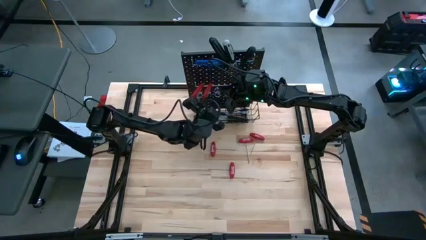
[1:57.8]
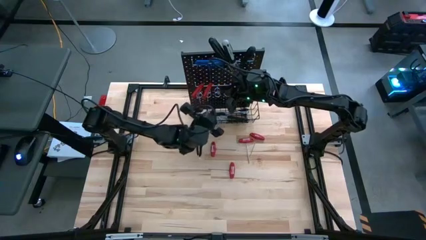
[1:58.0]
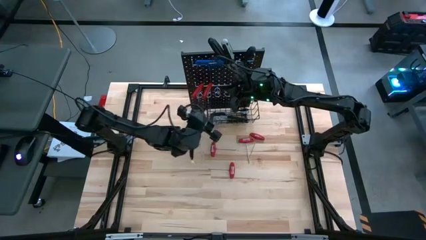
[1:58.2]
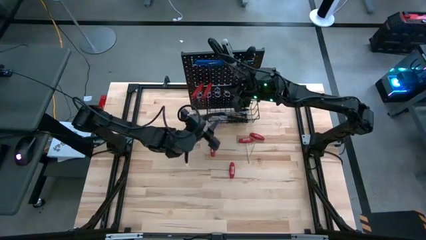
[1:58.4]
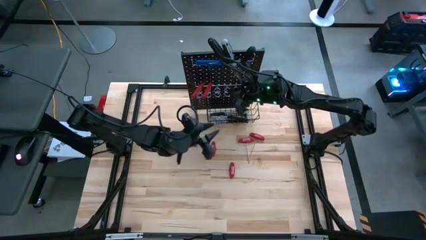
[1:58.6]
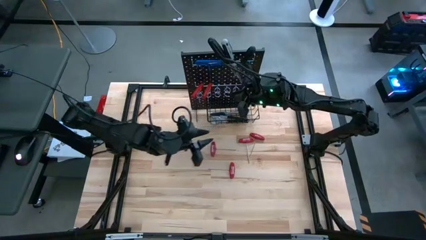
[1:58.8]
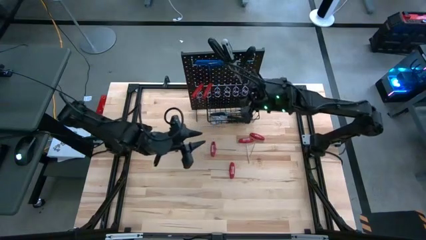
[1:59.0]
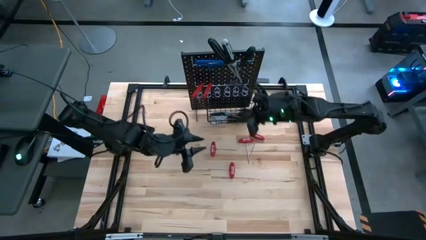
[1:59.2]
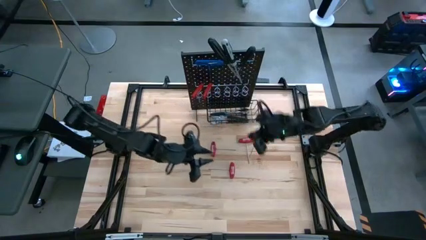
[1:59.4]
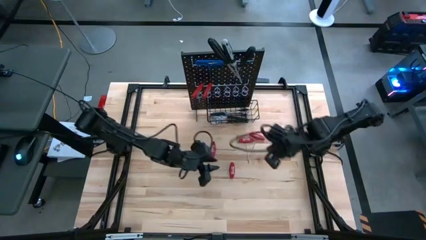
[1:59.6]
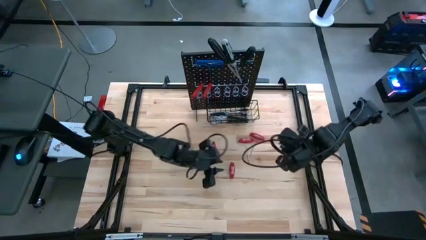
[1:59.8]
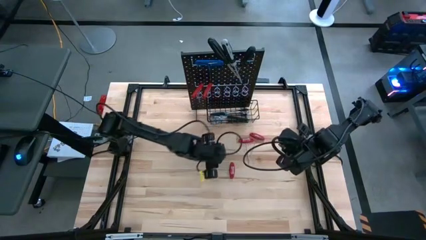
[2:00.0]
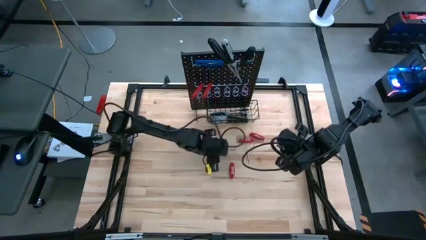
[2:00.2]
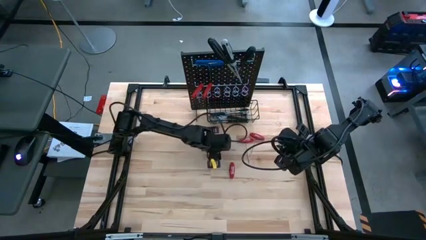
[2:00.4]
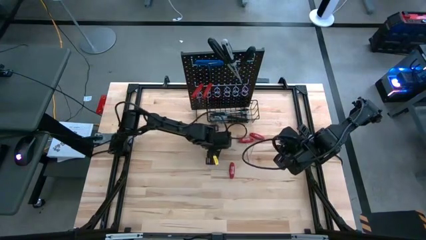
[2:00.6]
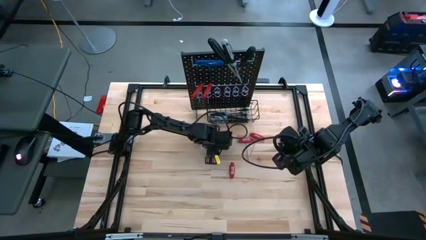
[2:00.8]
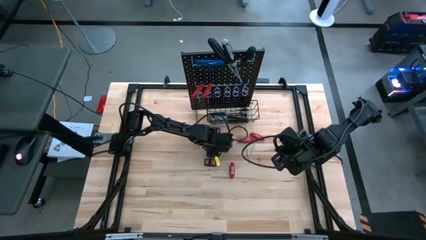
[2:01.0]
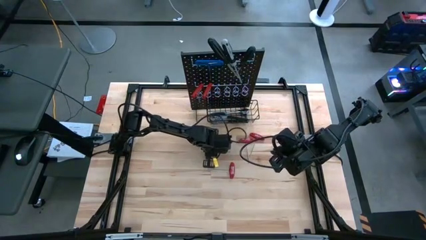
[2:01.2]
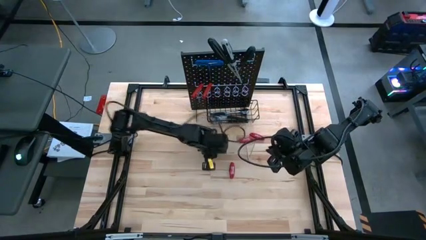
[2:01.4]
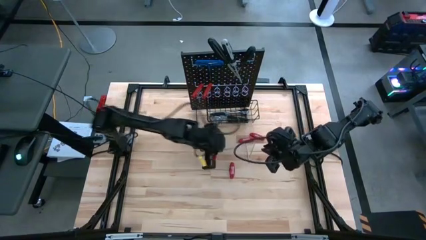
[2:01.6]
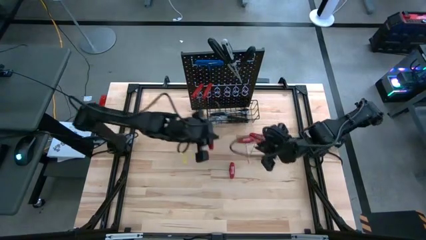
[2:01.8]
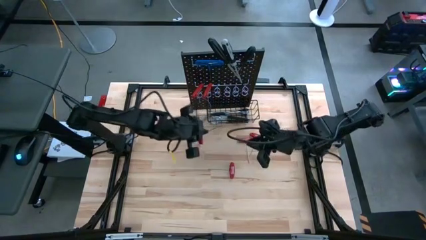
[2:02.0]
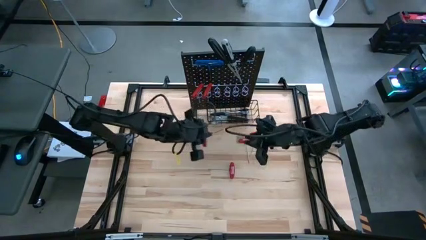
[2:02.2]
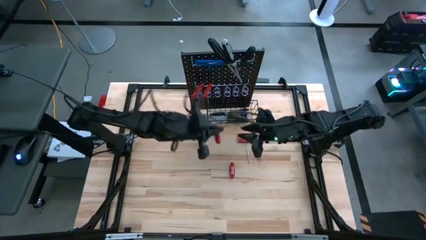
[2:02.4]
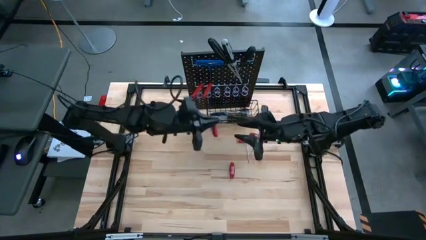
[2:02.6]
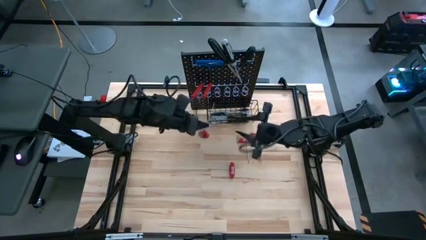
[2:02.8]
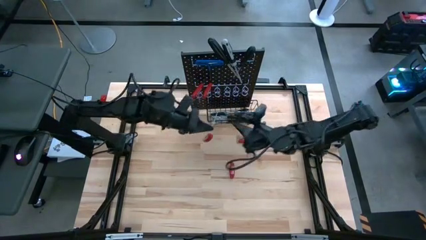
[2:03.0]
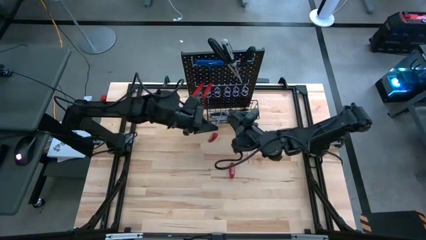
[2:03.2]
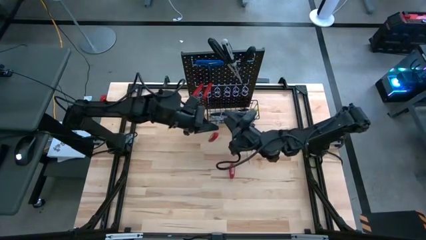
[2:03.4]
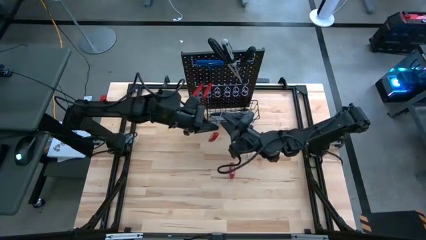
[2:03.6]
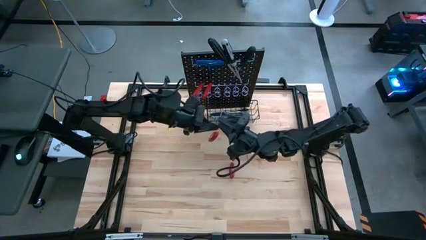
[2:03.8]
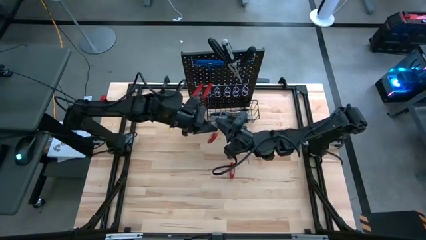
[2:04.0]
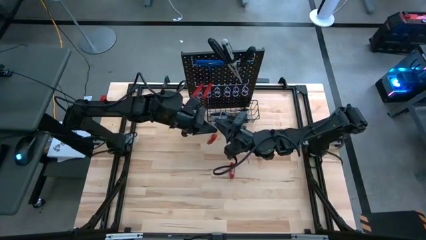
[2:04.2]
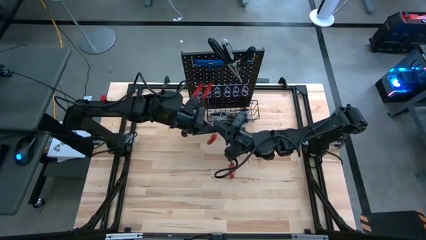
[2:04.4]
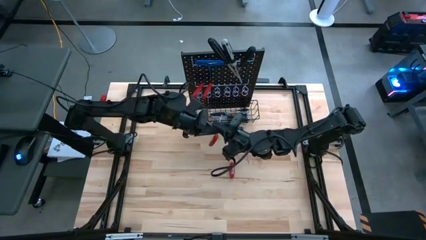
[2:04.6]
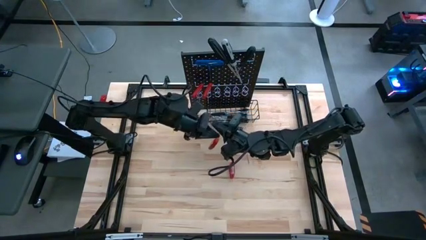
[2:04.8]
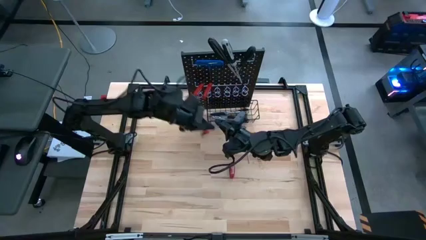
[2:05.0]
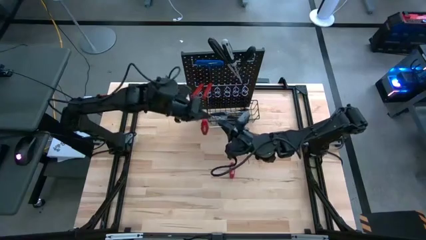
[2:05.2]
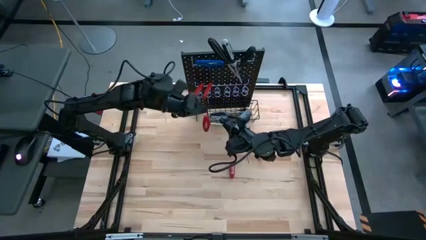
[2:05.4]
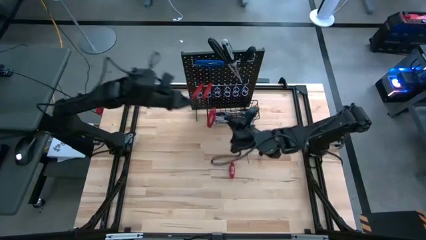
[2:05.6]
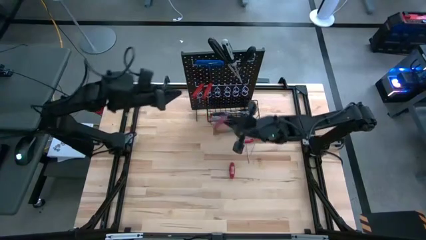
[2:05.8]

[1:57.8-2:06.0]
Task: Hang tools onto peg board
Hang the red allen wrench on the pegboard

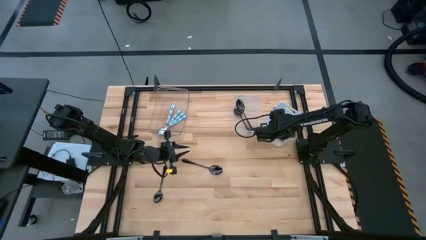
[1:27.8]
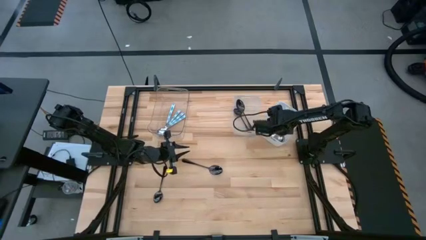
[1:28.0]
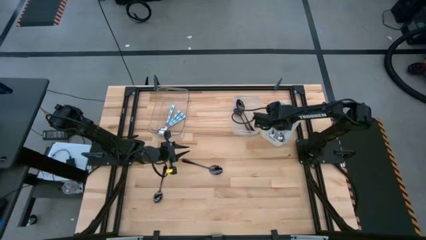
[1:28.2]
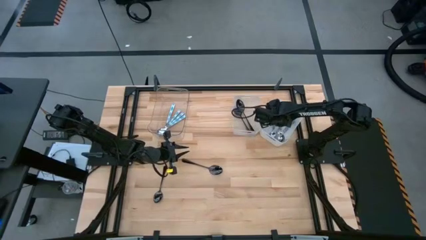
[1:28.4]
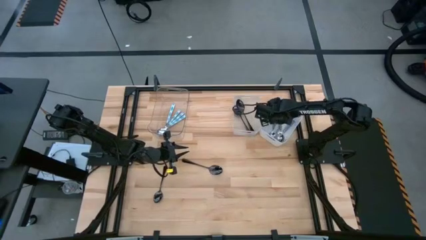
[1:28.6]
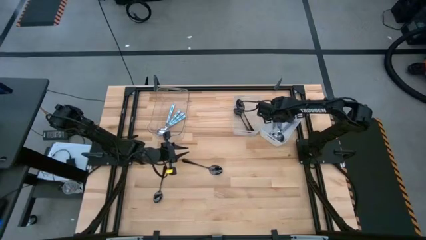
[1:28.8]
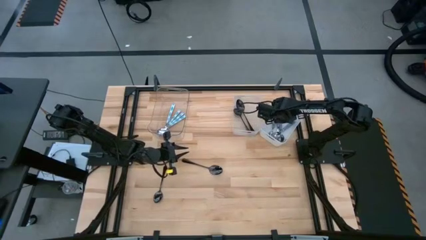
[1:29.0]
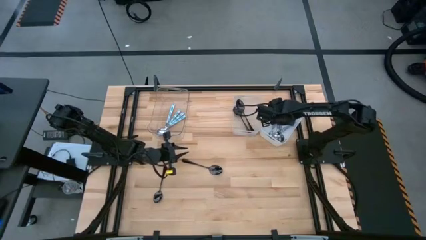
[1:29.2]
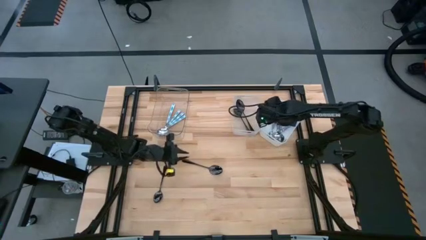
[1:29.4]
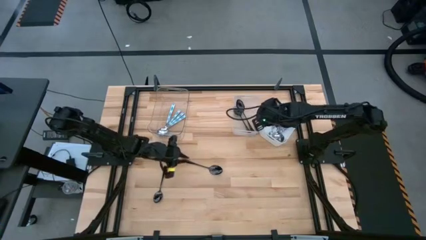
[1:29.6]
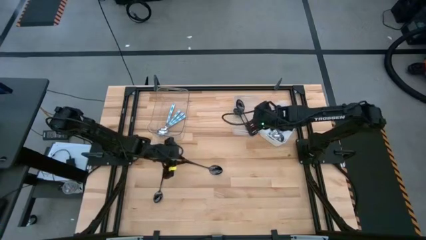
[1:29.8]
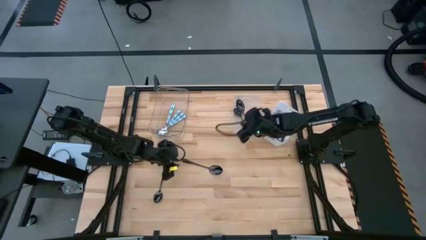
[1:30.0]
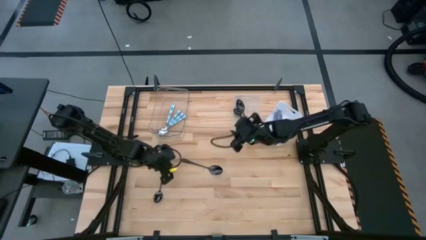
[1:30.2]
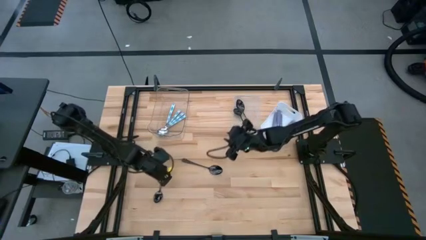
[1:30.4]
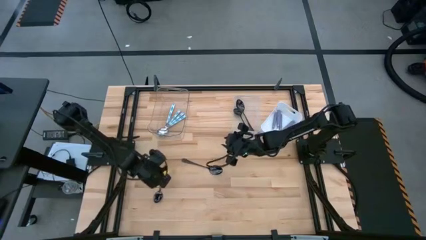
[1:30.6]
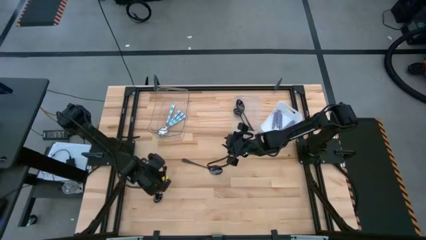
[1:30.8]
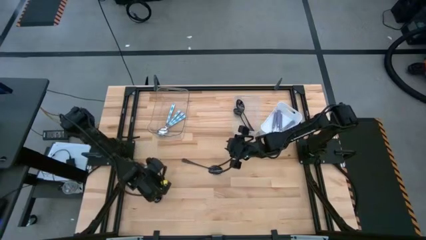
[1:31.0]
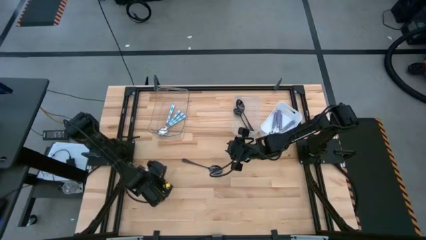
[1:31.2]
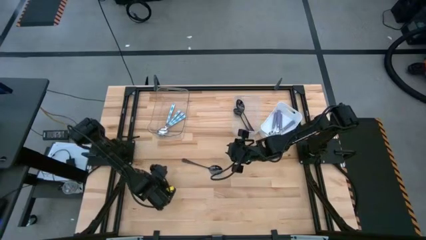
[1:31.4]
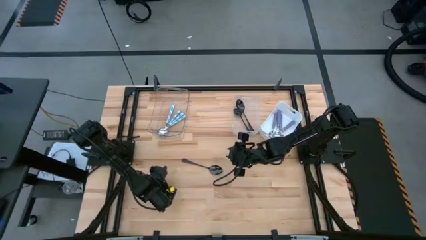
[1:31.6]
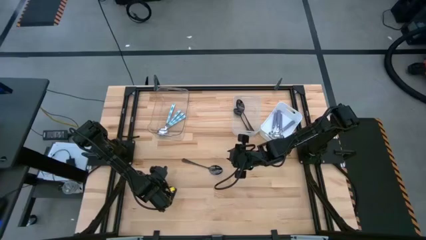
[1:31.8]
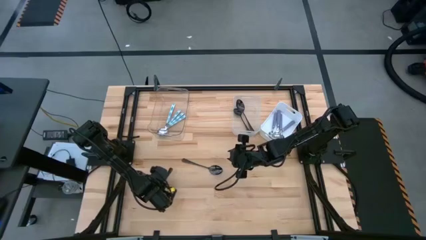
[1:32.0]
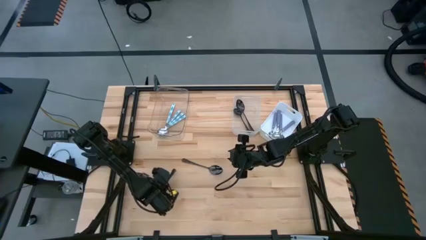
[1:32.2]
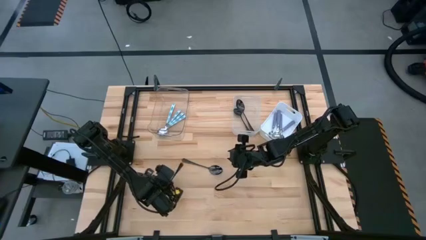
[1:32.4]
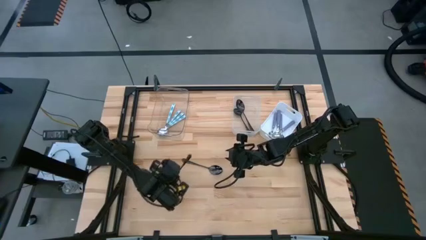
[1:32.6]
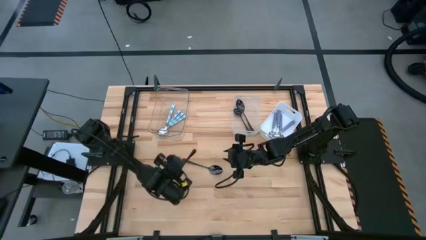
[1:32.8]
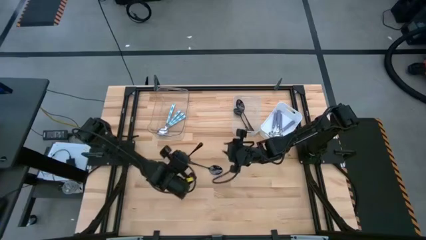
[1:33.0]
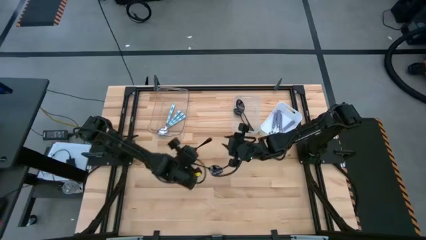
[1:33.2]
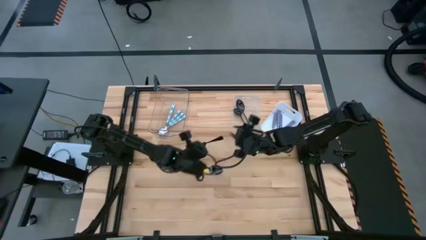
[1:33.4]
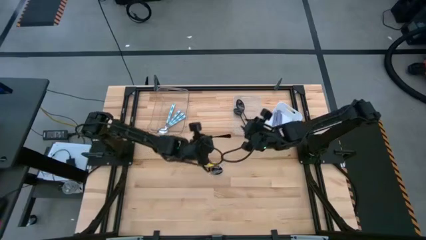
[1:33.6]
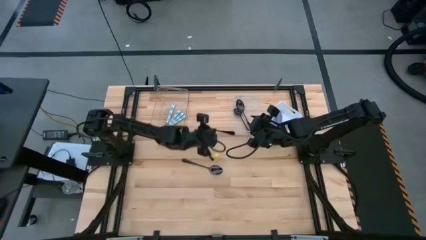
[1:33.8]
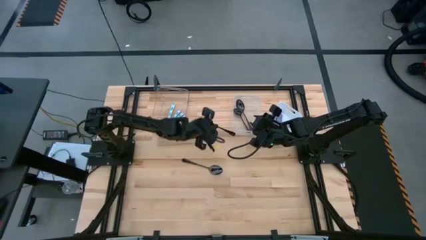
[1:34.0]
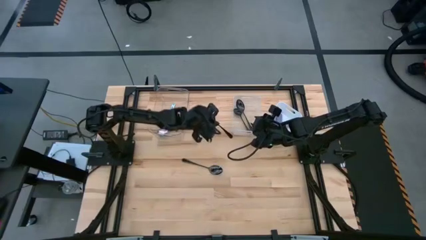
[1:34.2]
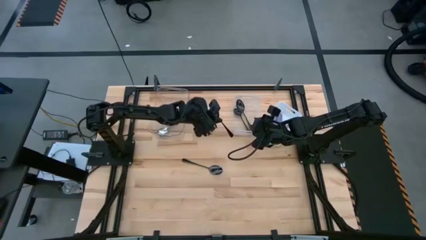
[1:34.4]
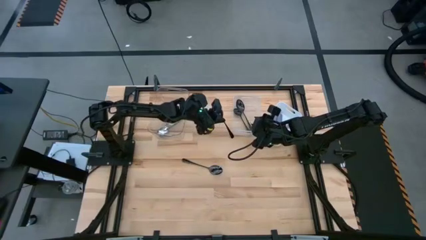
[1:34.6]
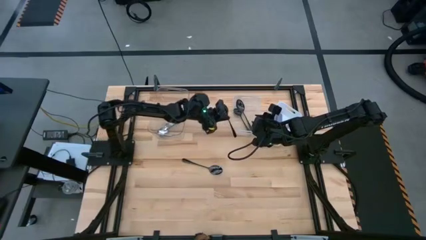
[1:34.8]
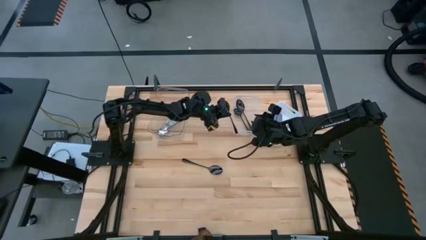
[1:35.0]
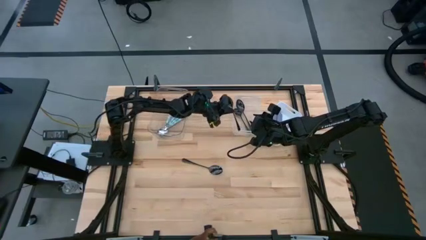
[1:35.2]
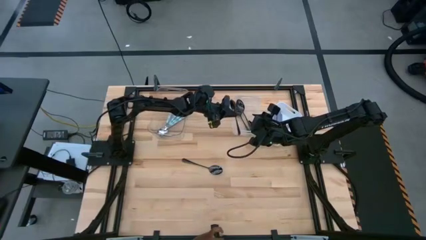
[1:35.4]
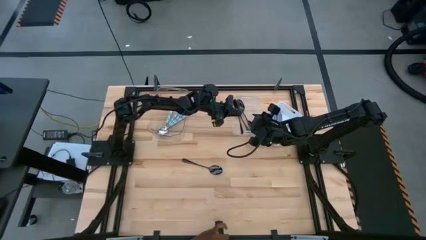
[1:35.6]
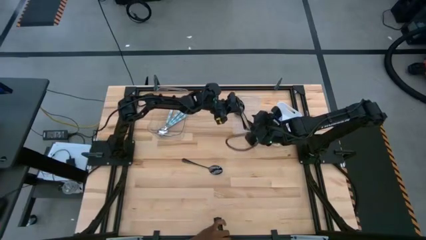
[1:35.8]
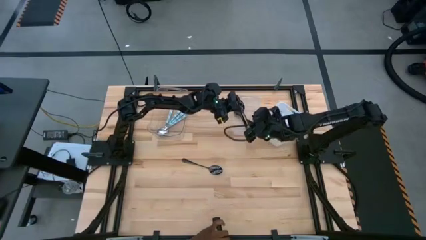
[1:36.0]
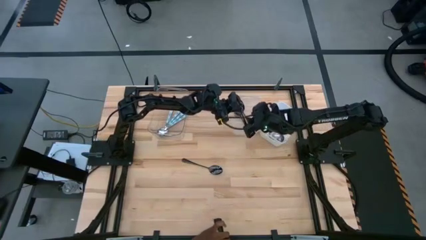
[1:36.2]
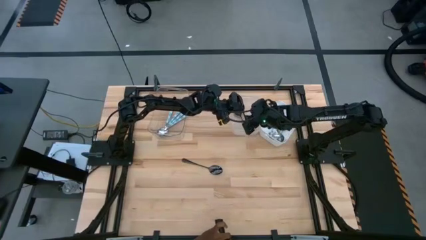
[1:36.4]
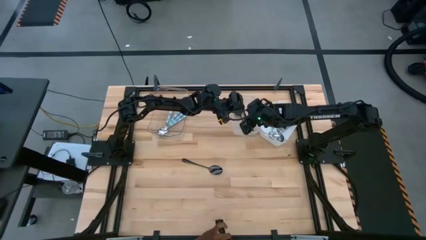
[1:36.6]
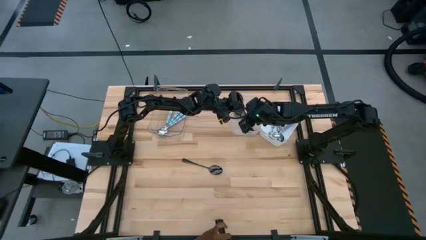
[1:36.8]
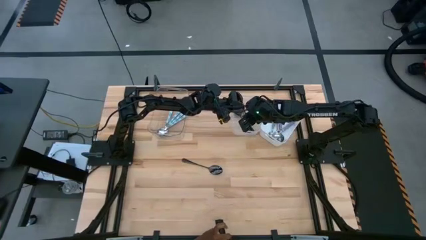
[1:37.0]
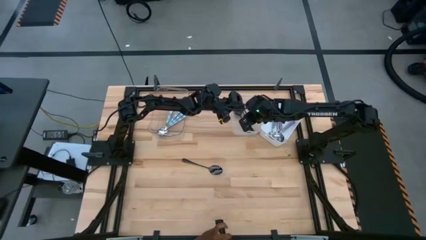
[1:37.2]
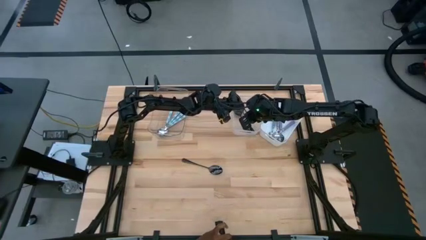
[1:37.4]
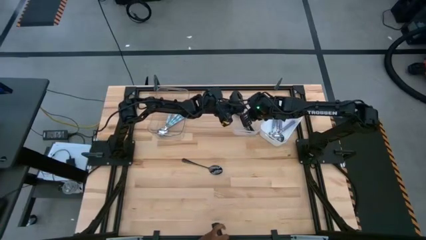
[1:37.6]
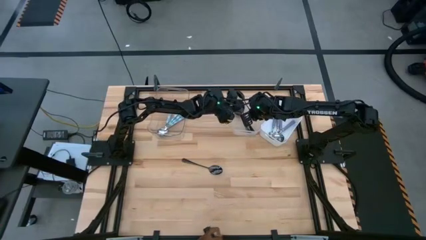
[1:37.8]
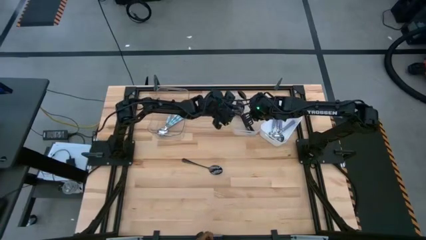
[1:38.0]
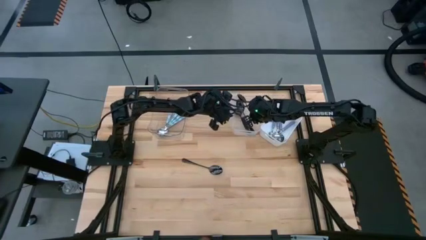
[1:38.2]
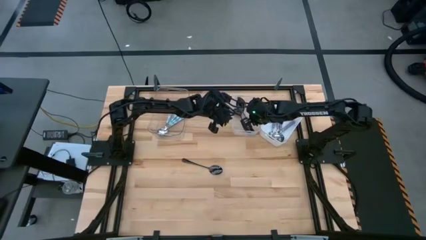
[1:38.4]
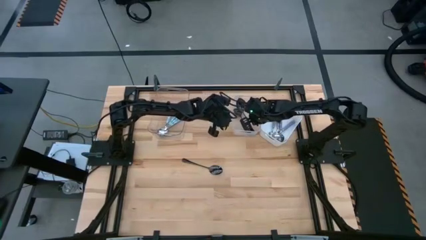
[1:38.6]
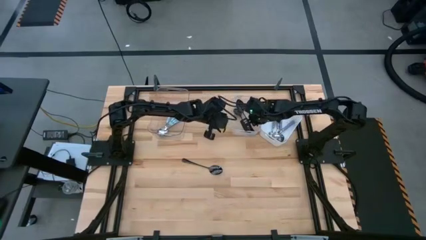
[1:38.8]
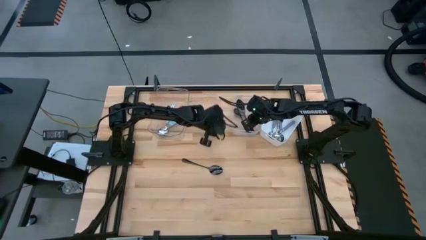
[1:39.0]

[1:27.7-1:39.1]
Task: Sort silverware by color (type)
Put the black spoon into the transparent white bin
